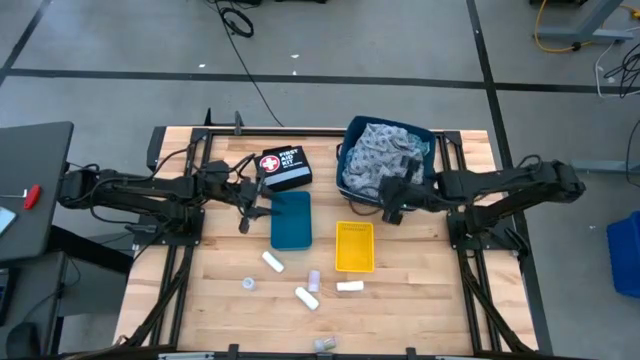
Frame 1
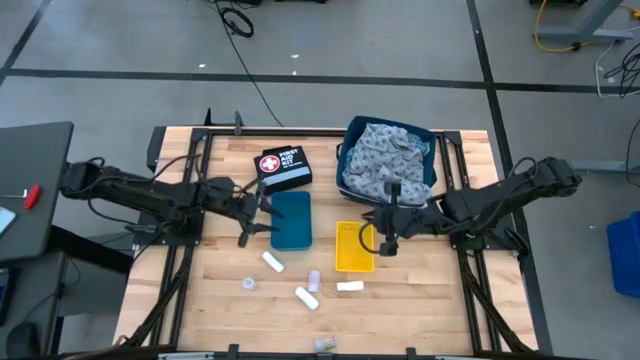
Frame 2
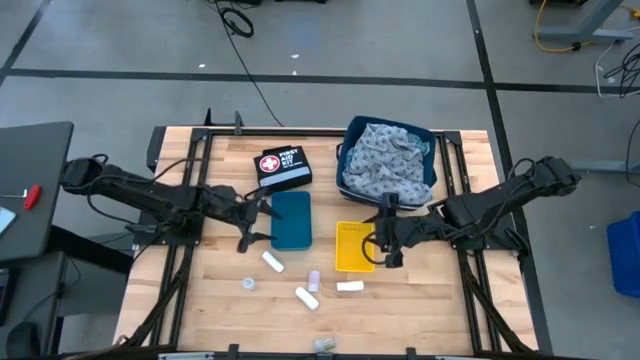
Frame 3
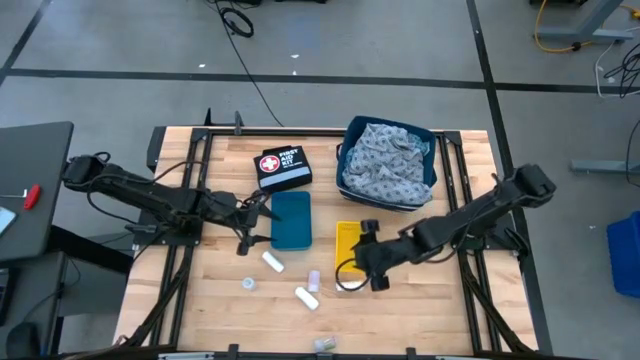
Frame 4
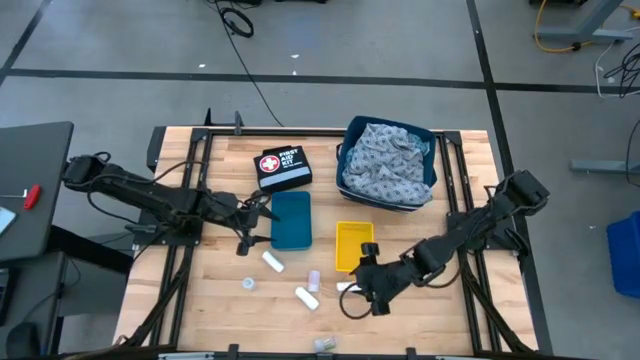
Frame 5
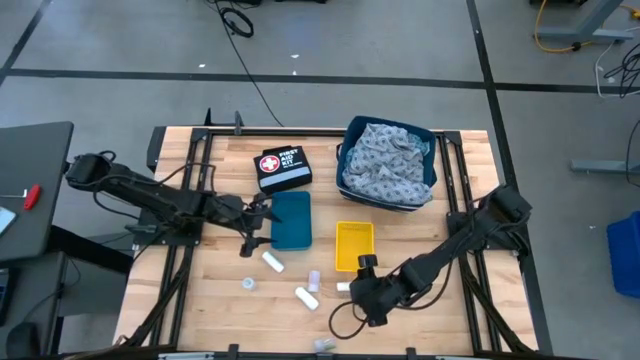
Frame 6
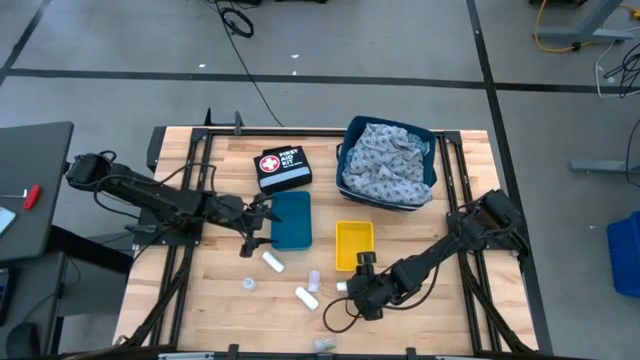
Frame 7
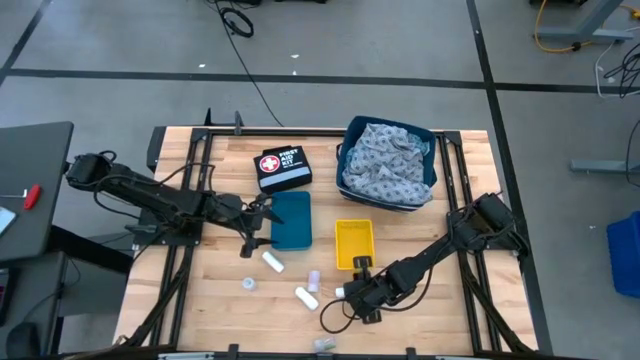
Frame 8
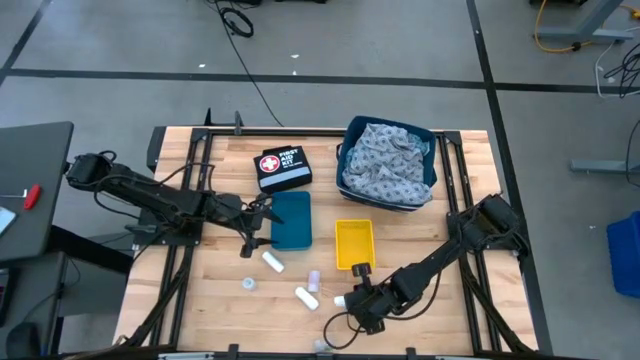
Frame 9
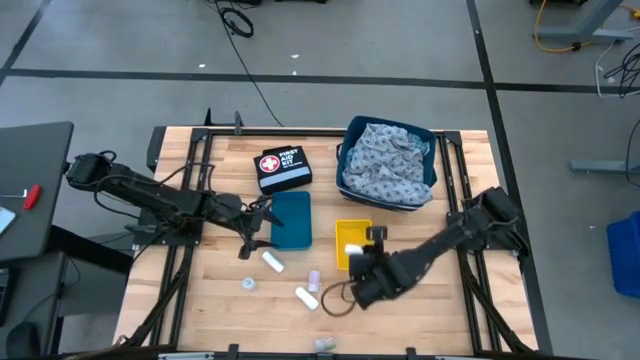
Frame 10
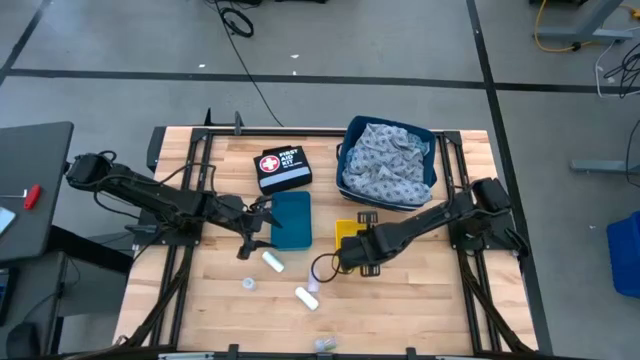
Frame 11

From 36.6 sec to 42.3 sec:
Task: Pick & place medical supplies in basket/bin
Put the right rolled white gauze into the yellow bin

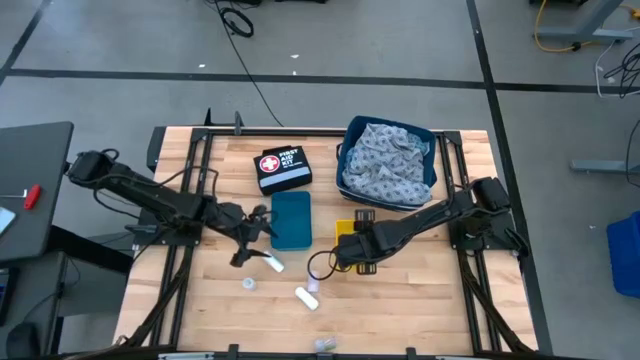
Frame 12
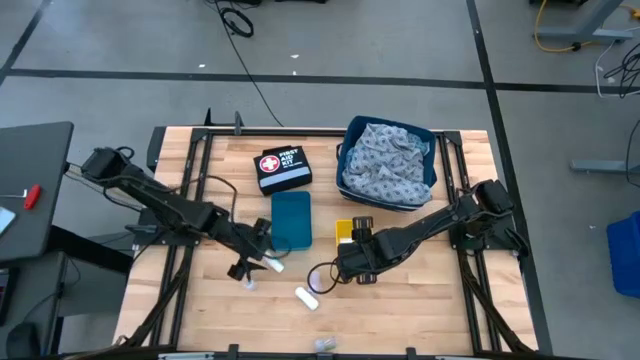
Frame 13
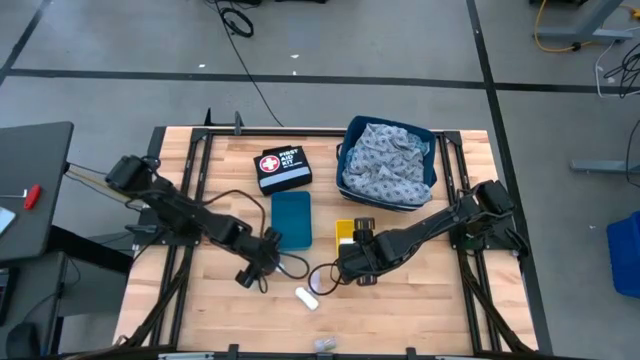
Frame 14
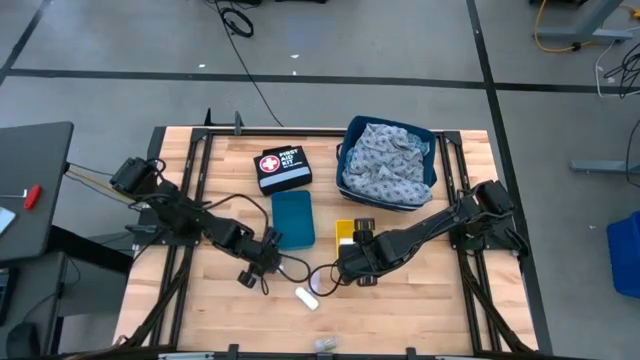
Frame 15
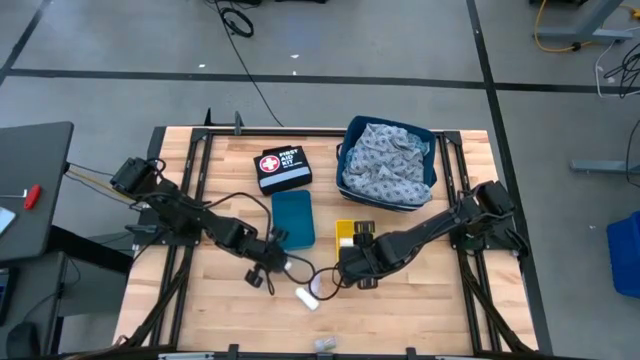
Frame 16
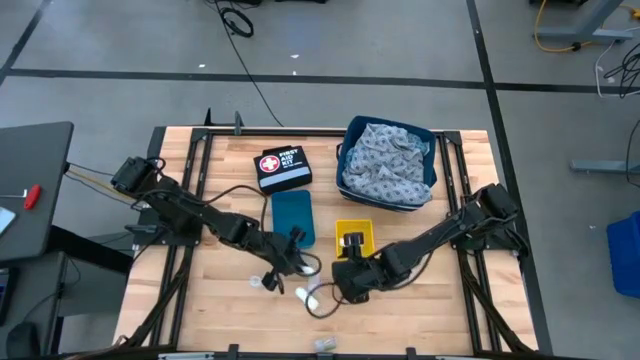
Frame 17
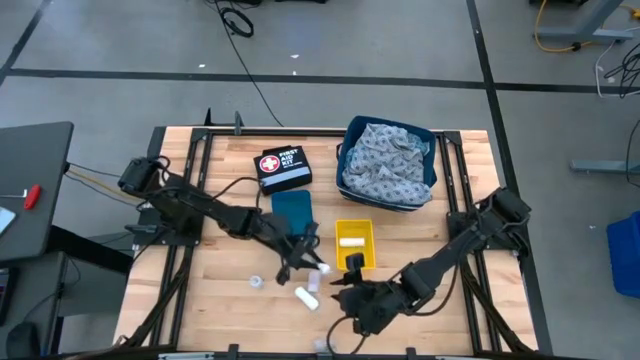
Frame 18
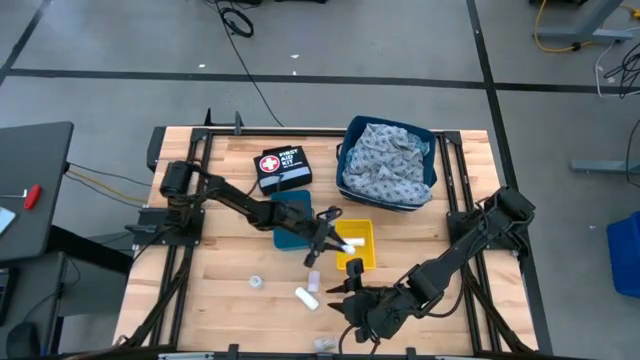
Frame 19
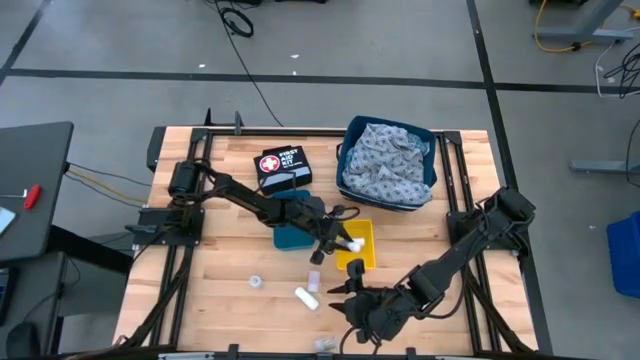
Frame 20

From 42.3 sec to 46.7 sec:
Put the top rolled white gauze into the yellow bin

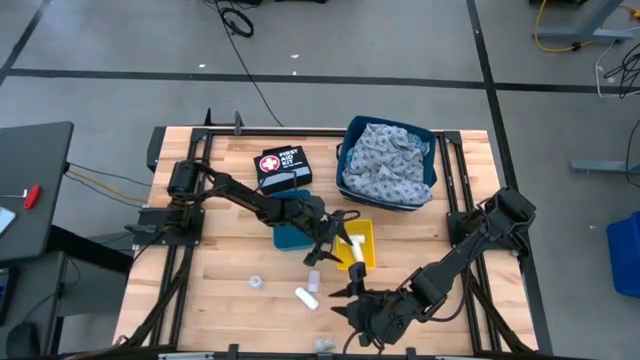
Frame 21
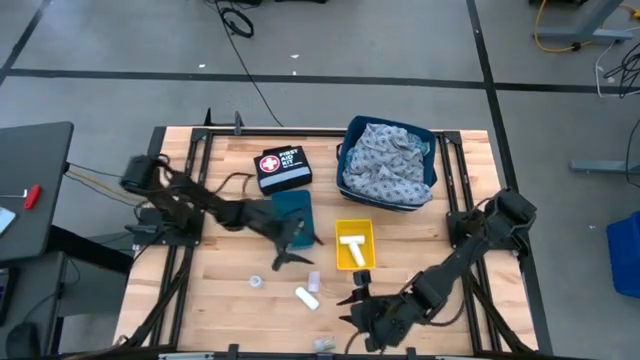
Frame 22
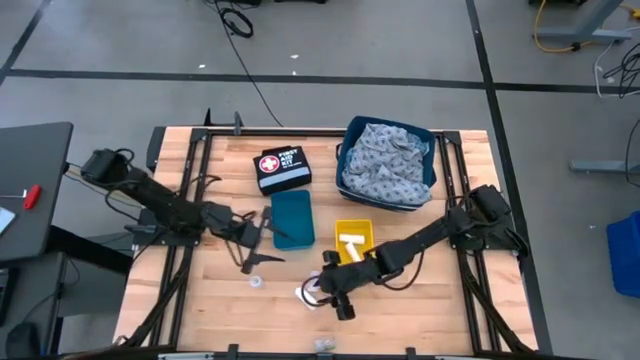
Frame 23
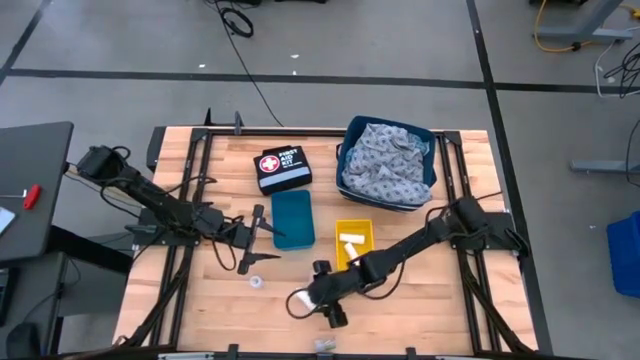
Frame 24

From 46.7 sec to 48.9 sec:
Put the rolled white gauze into the yellow bin

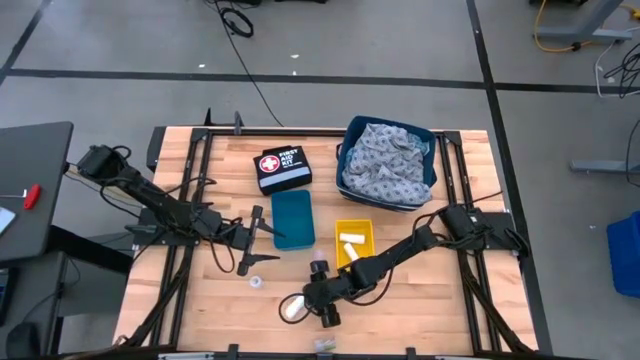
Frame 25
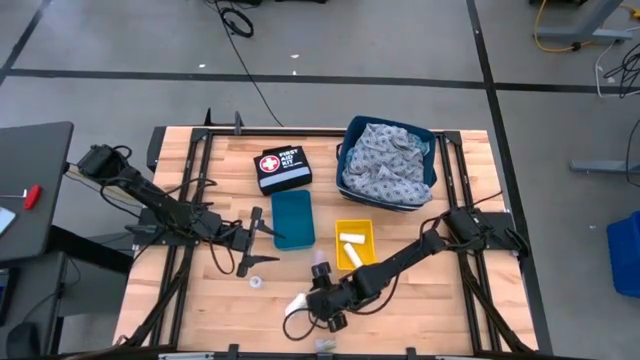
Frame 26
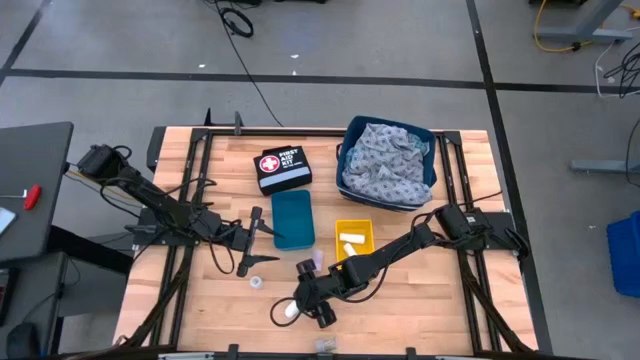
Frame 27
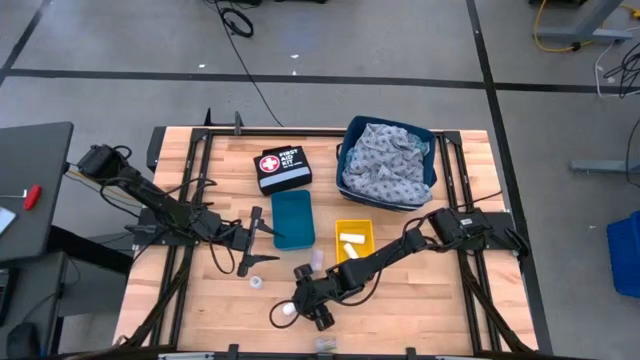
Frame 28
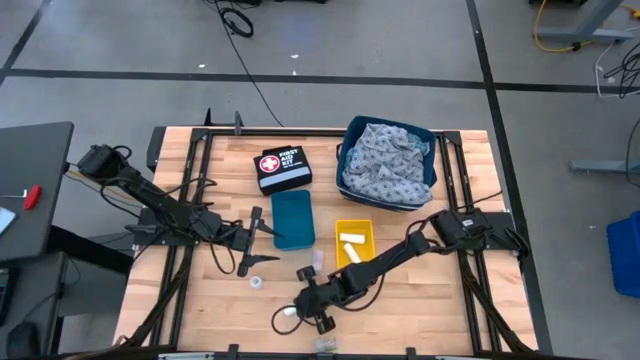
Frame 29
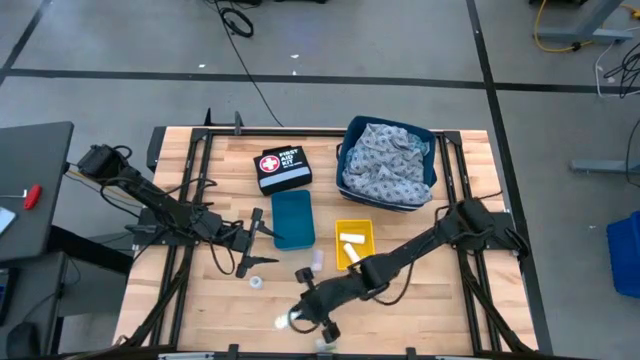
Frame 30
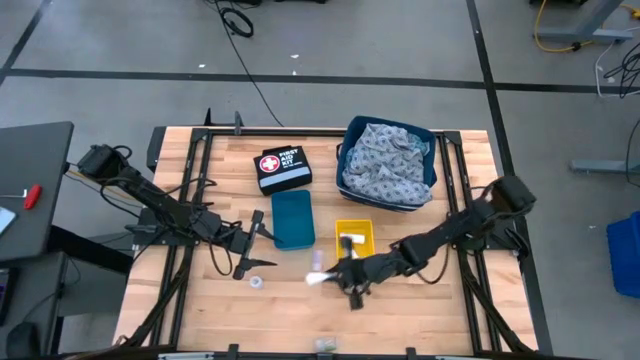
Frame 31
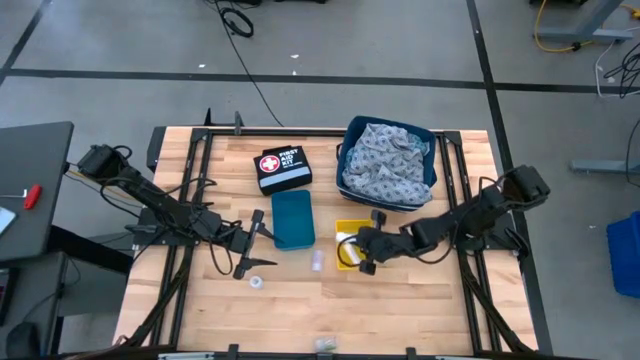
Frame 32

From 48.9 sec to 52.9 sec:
Put the rolled white gauze into the yellow bin

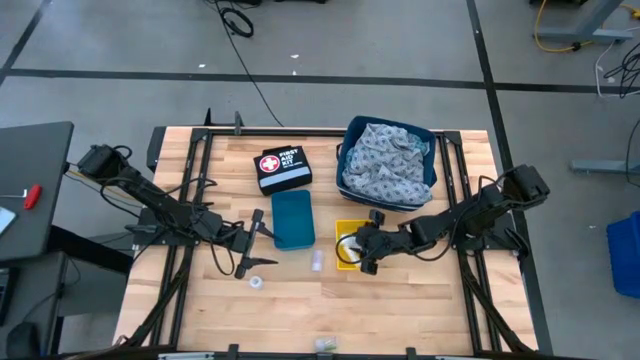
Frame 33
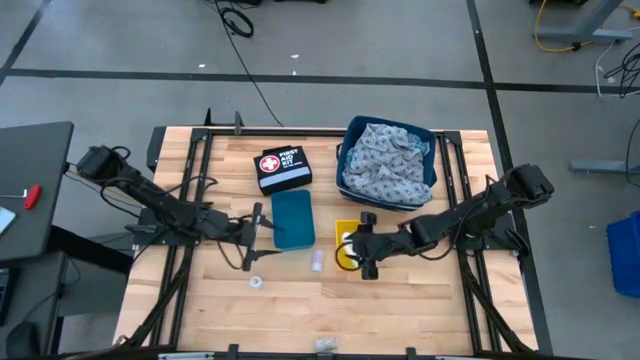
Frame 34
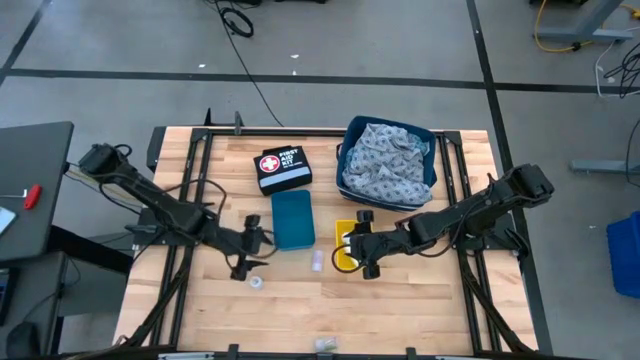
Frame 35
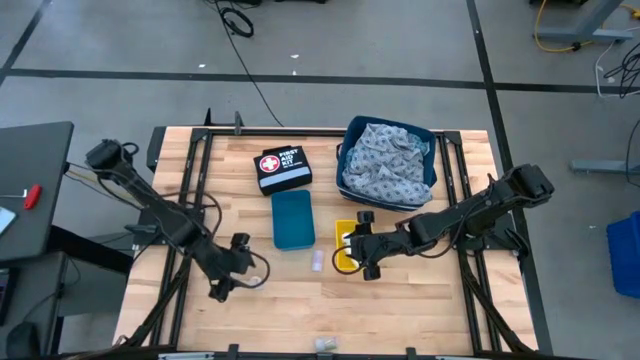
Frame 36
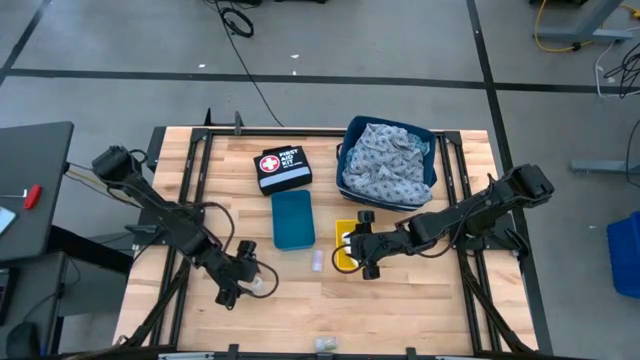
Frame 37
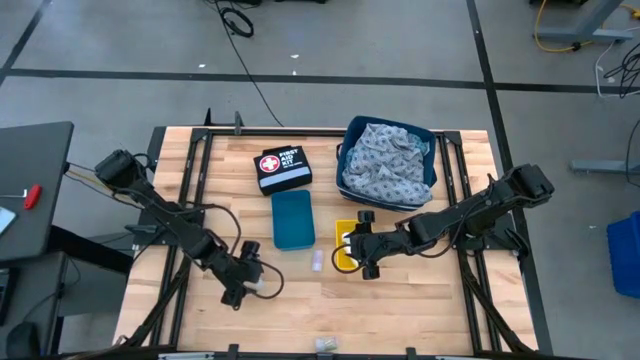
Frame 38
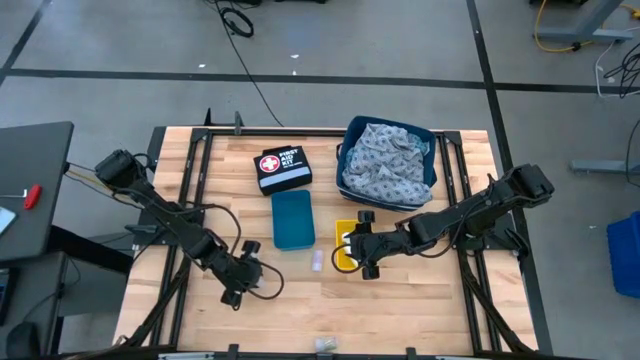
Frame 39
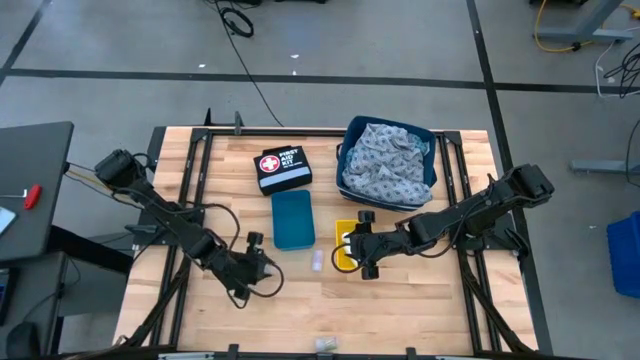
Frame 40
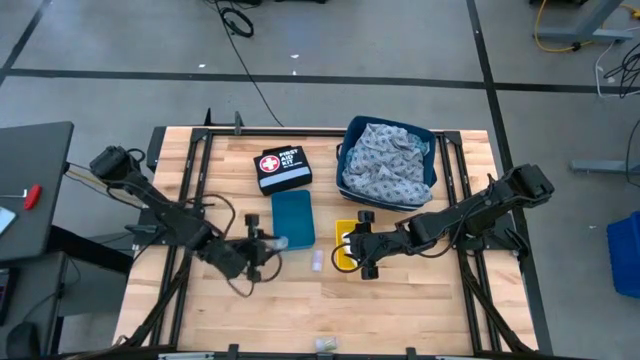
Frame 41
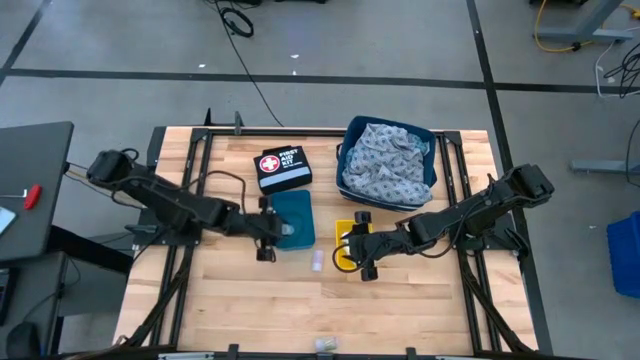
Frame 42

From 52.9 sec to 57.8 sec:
Put the left transparent pill bottle into the blue bin
